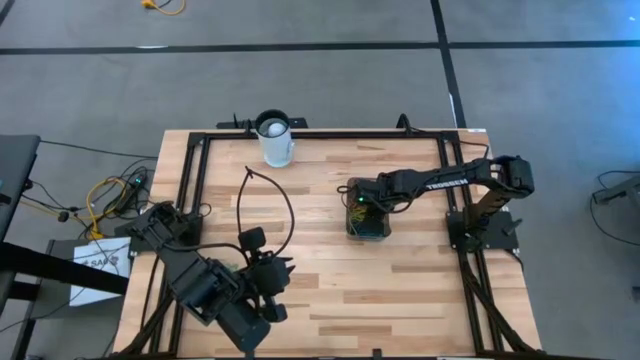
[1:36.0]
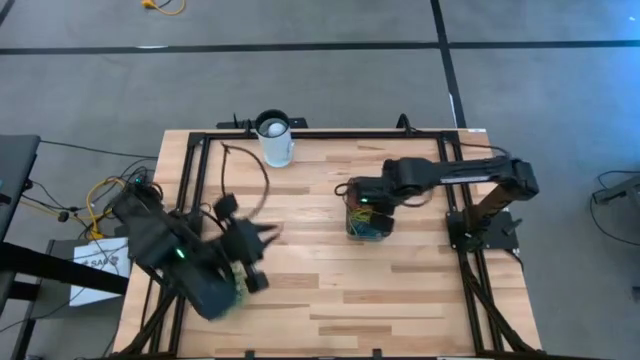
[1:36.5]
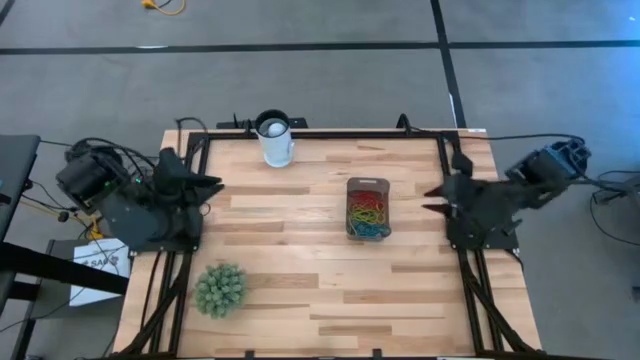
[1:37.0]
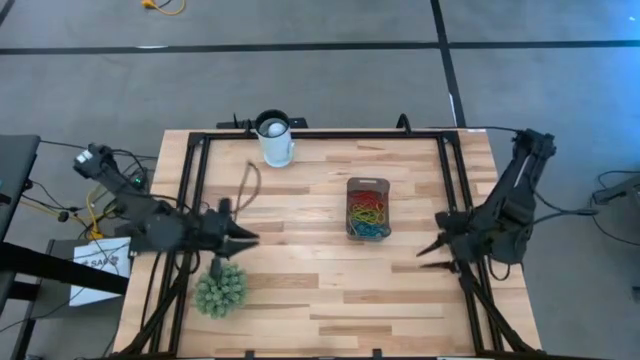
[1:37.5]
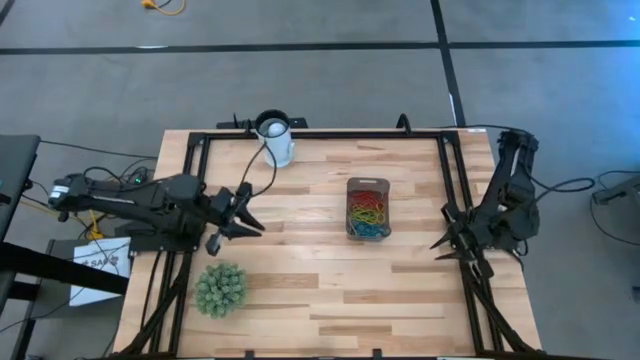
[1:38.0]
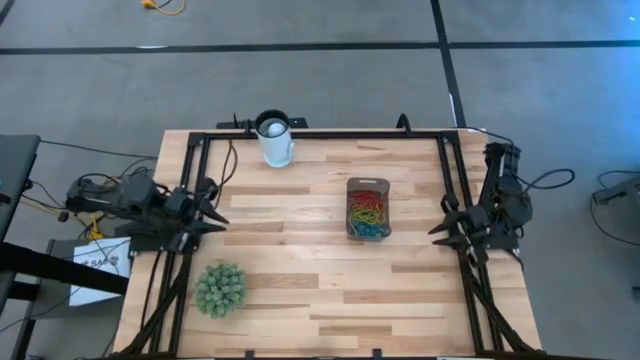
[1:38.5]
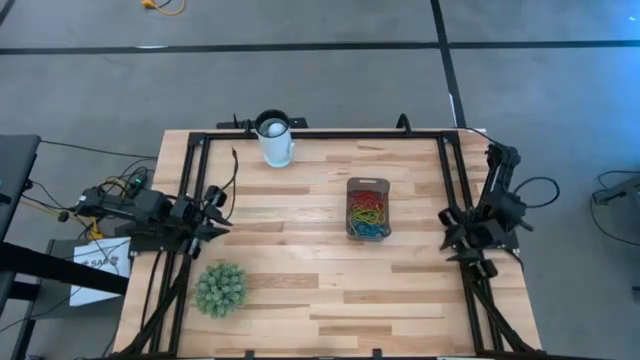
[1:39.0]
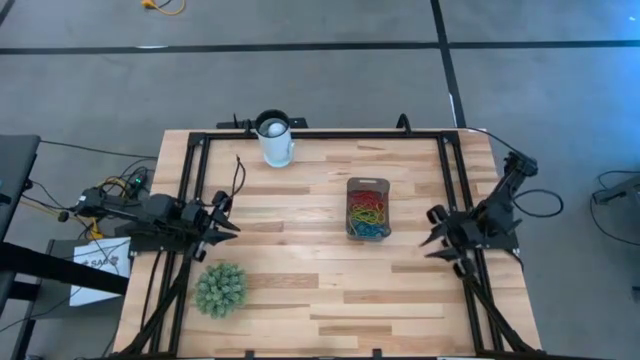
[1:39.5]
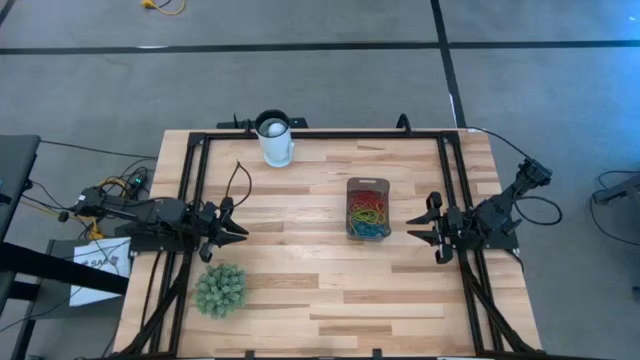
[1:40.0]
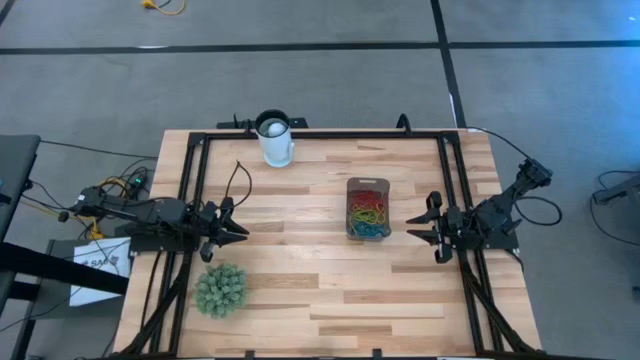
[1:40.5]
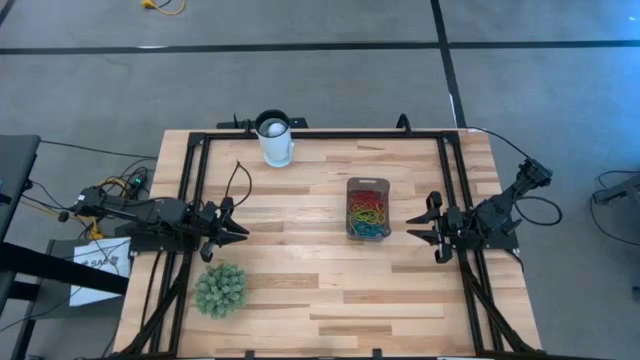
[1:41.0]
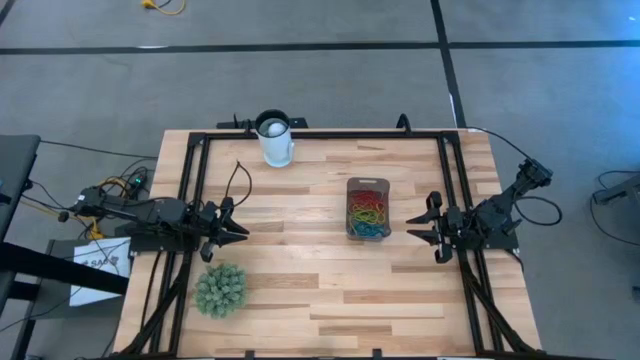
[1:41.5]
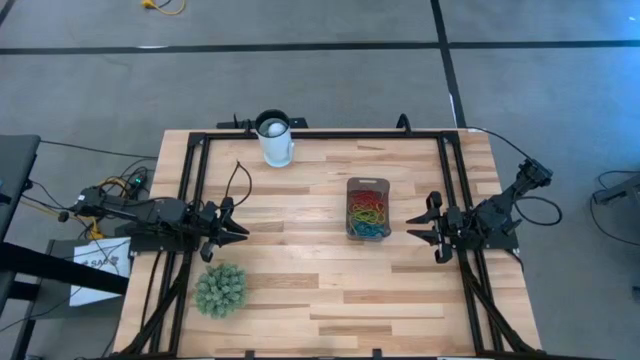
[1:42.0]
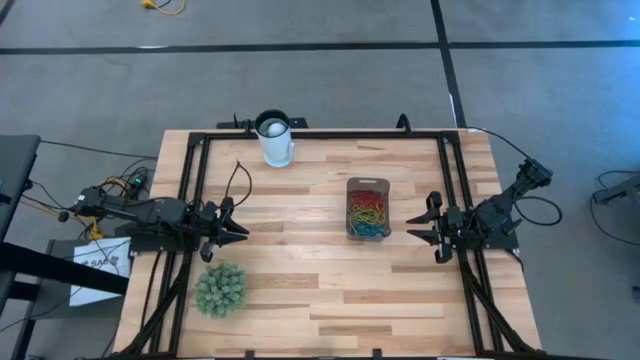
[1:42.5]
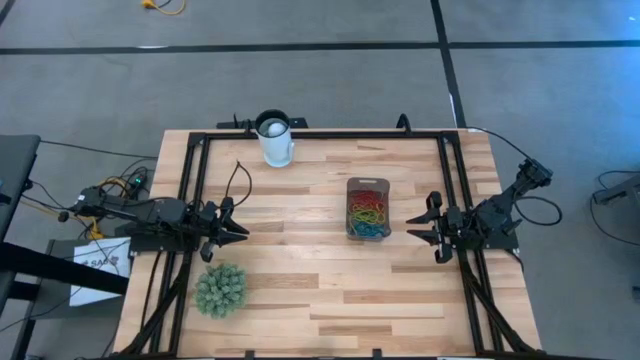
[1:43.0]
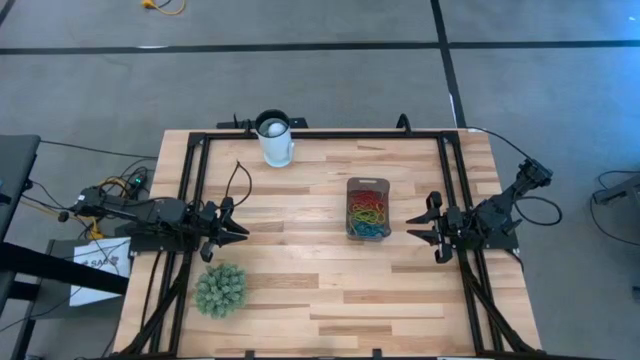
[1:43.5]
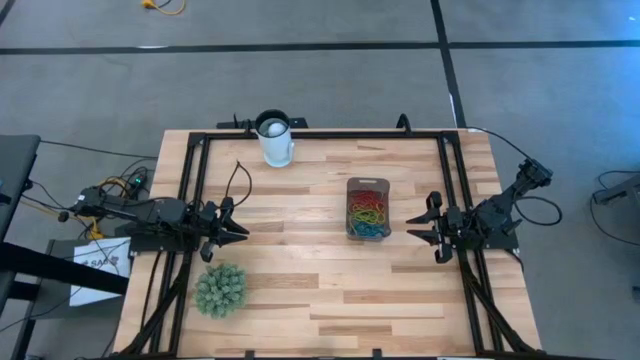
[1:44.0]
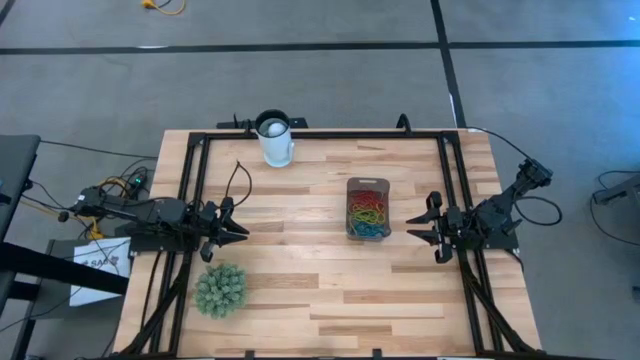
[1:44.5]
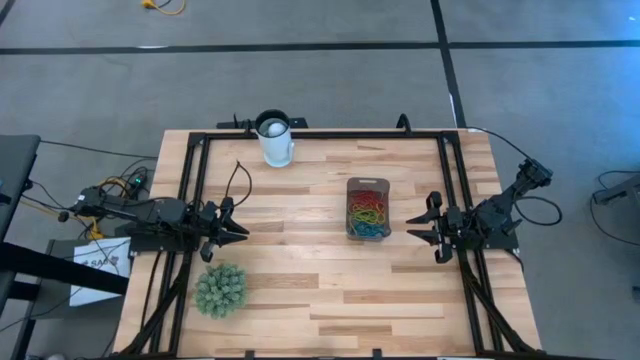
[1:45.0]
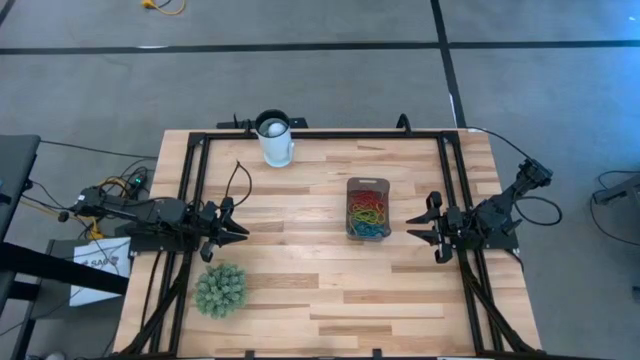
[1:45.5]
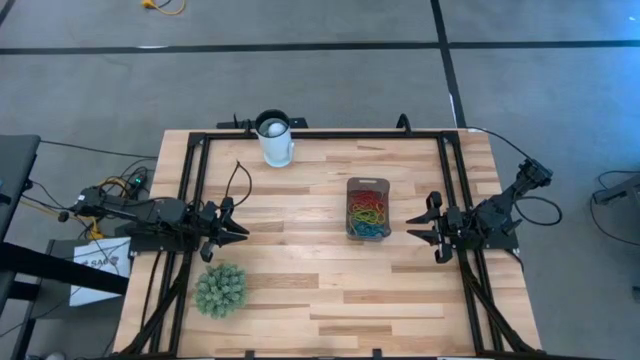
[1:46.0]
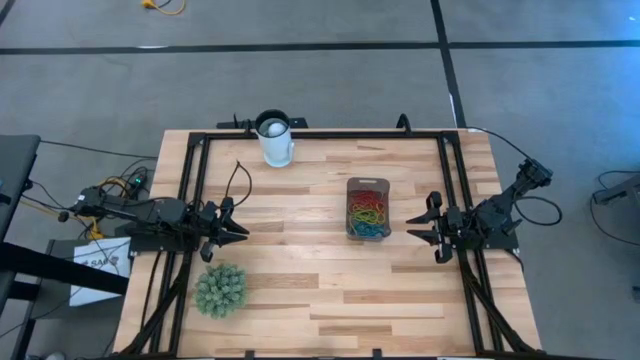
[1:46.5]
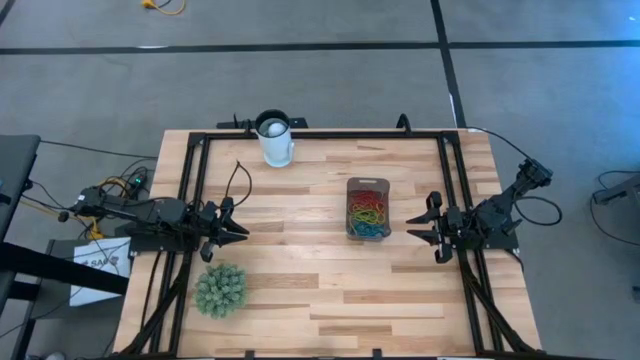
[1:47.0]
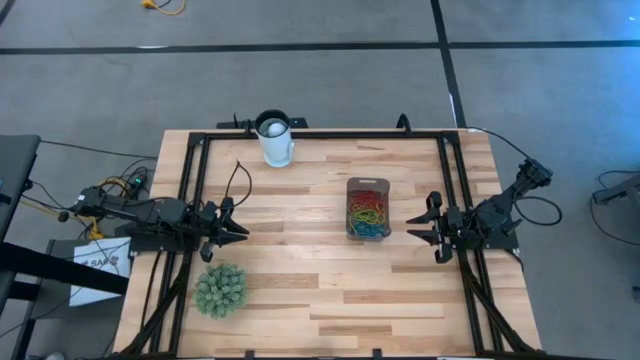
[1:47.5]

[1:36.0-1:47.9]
Task: Pick and place items into bin
Return to Home Position

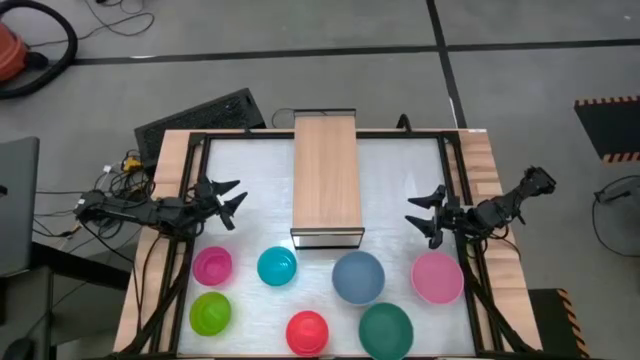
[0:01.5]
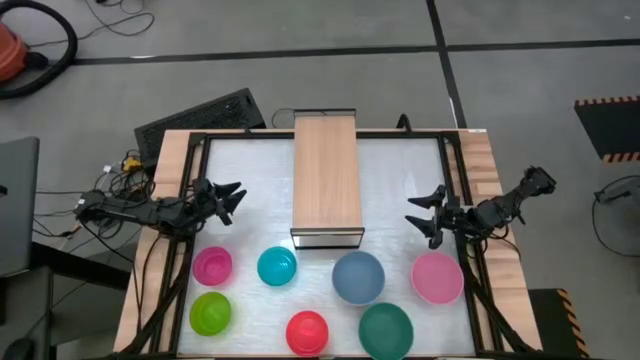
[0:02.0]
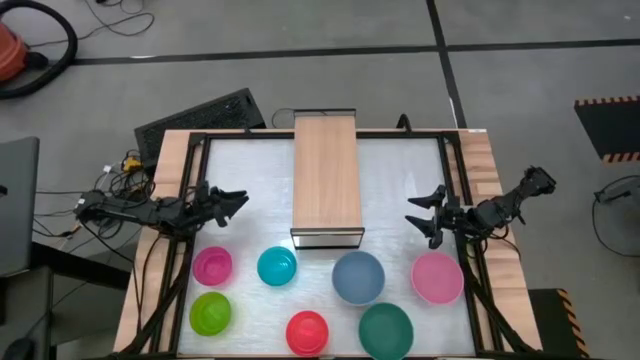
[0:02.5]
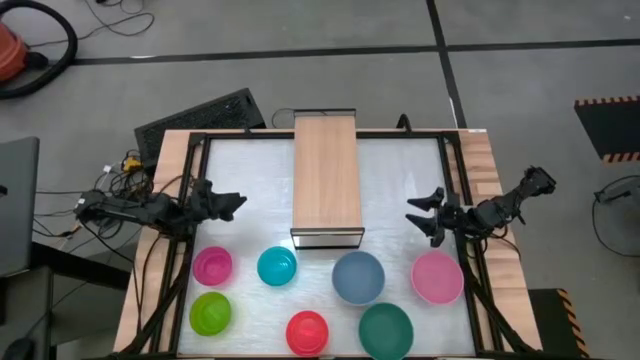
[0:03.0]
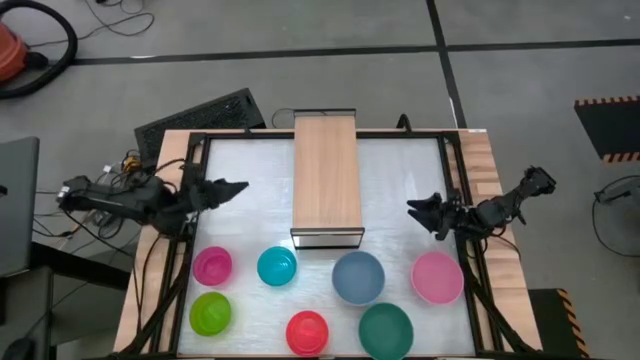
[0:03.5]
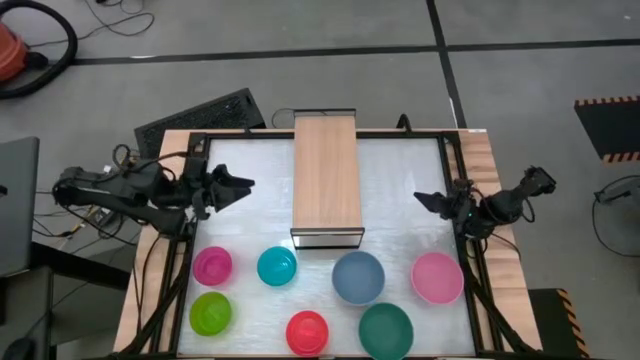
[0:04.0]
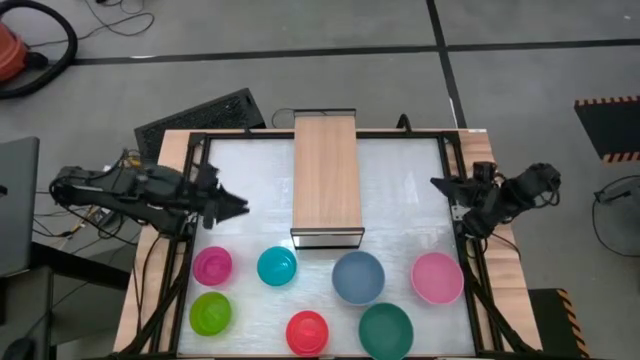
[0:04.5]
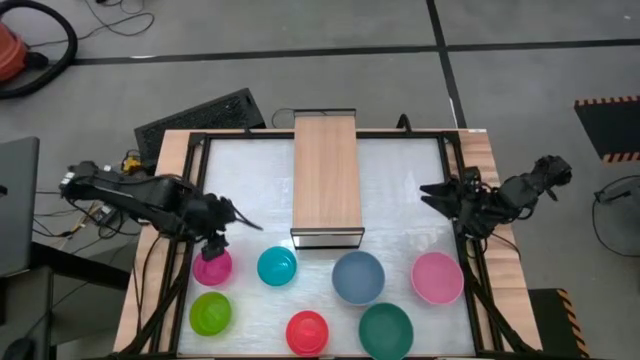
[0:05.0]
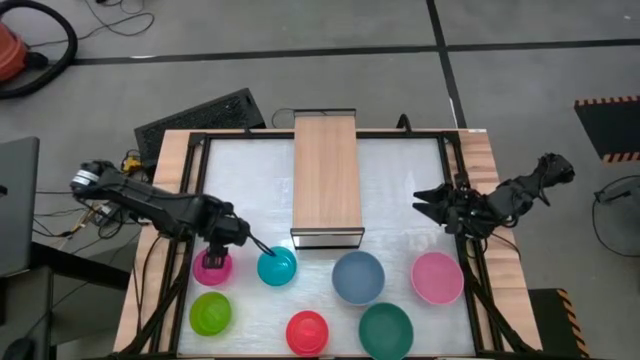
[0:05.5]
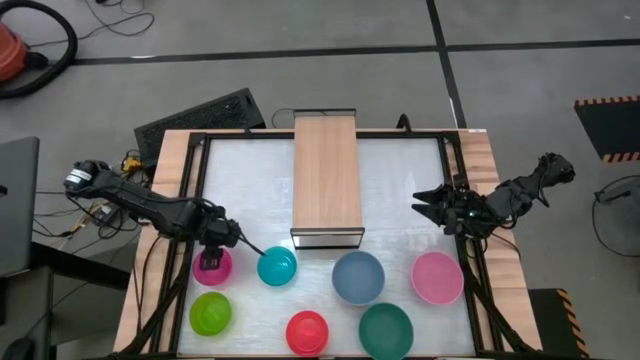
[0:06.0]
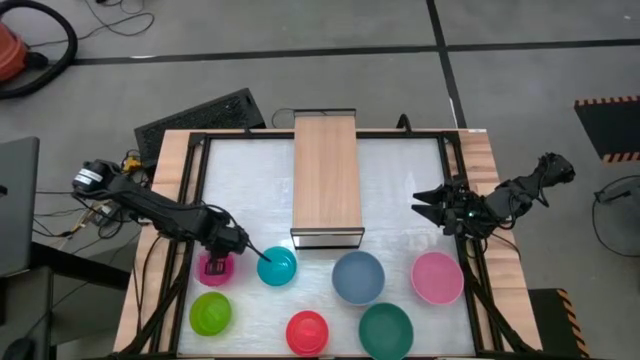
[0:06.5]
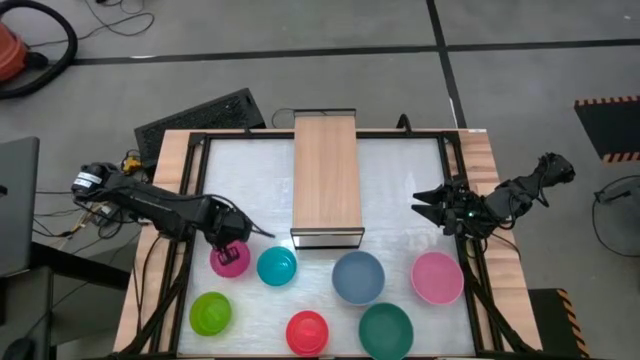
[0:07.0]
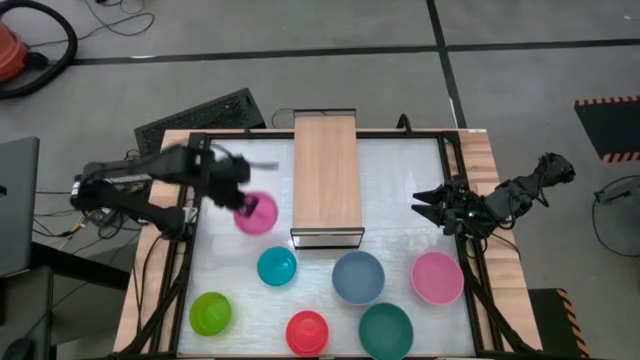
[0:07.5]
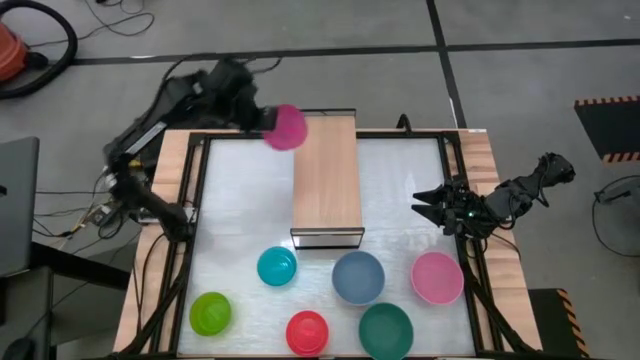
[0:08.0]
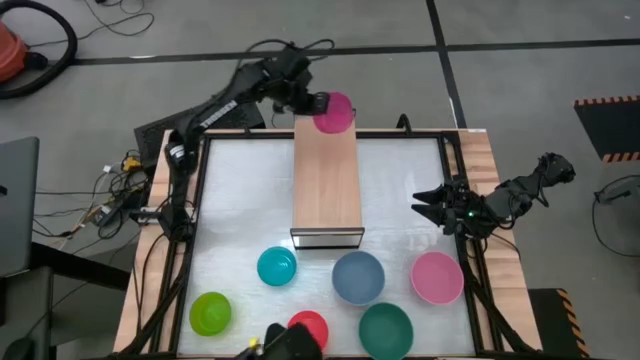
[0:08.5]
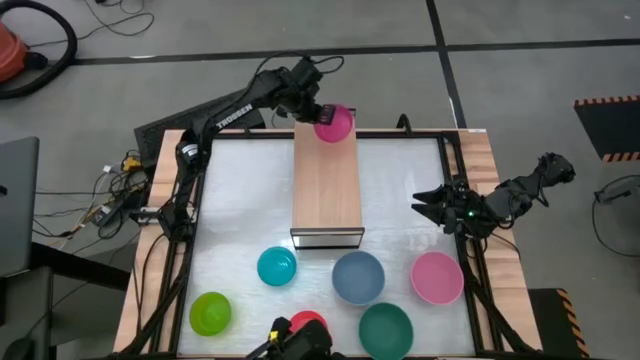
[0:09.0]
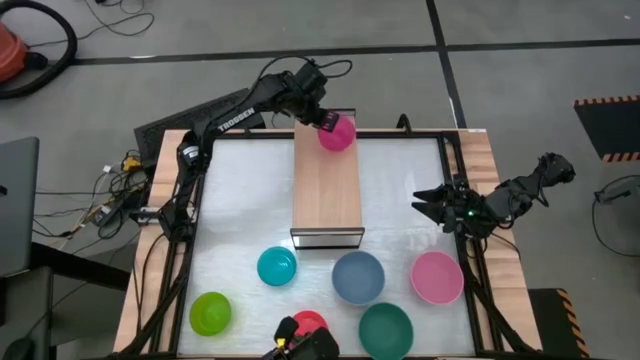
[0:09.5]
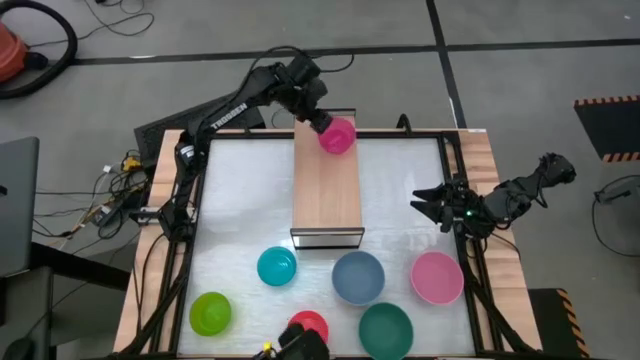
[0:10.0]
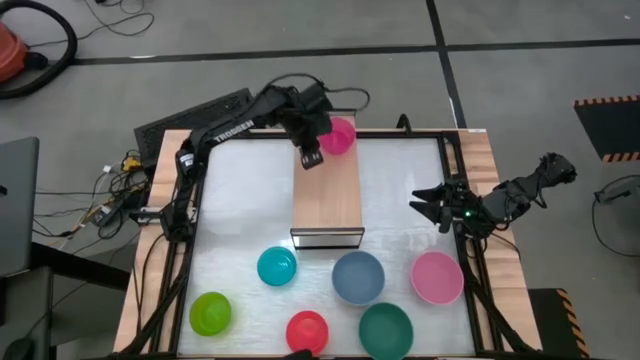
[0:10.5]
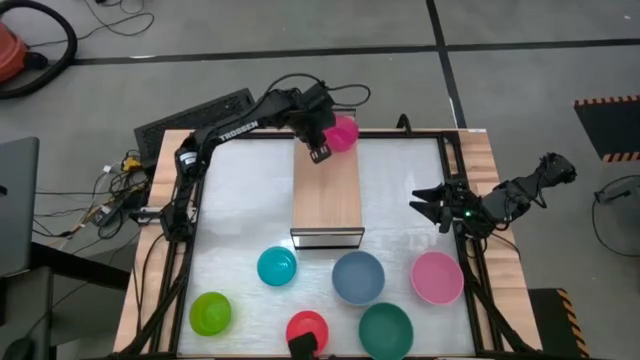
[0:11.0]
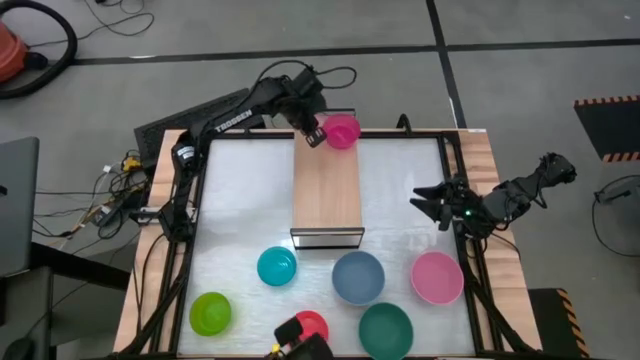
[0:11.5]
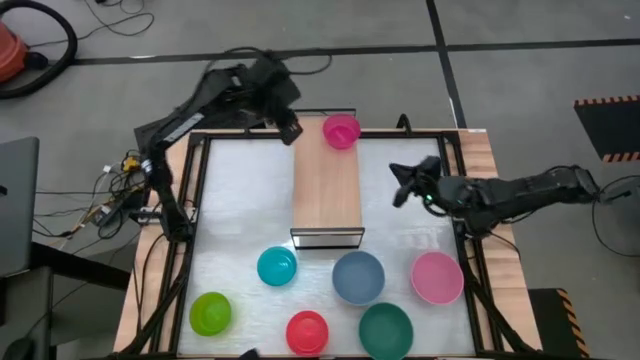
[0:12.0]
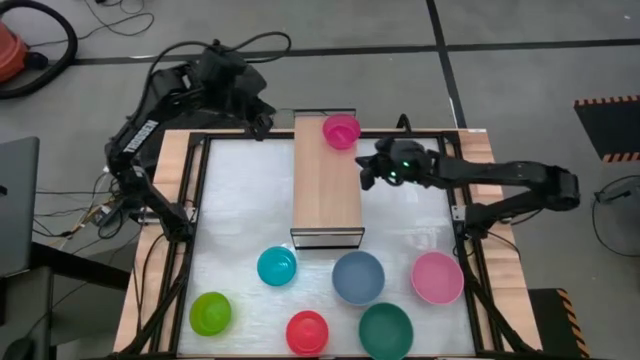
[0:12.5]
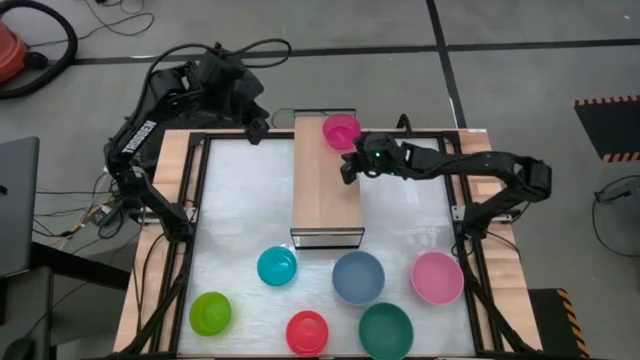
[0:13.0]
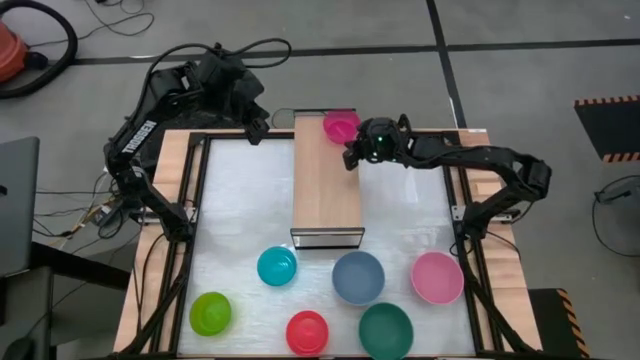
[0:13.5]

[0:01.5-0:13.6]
Task: Place and stack bowls onto a shelf
Put the pink bowl on the shelf
